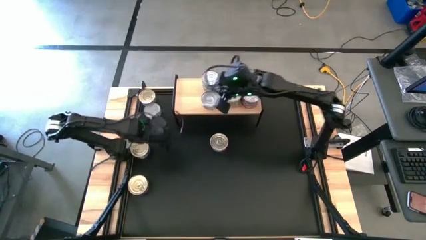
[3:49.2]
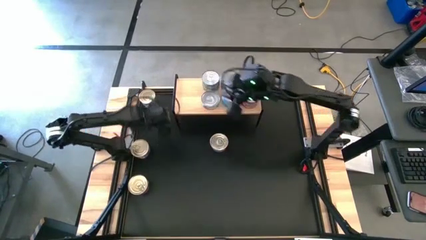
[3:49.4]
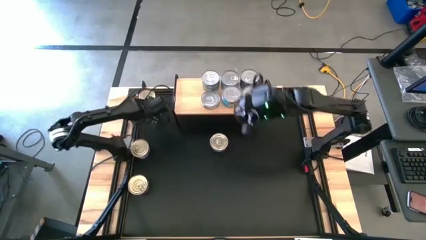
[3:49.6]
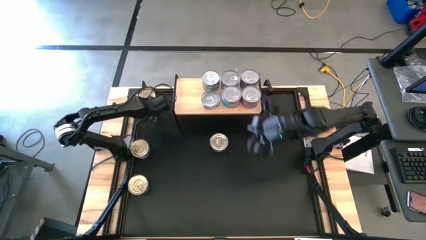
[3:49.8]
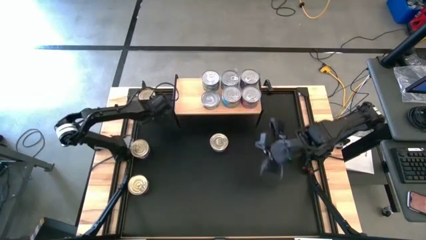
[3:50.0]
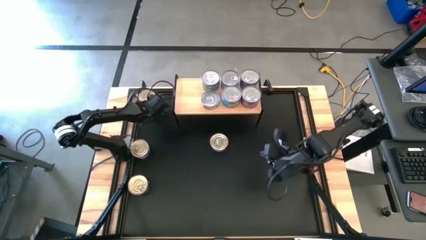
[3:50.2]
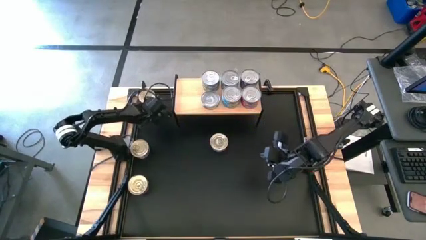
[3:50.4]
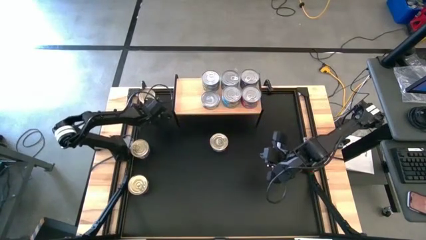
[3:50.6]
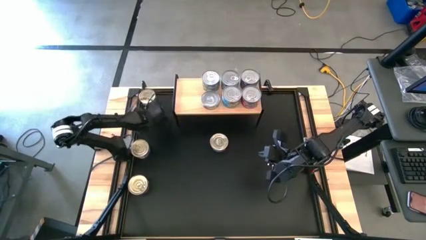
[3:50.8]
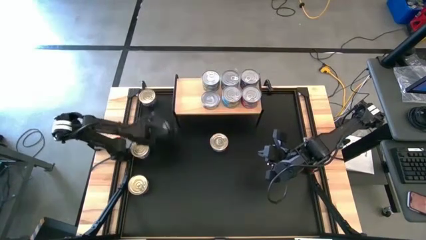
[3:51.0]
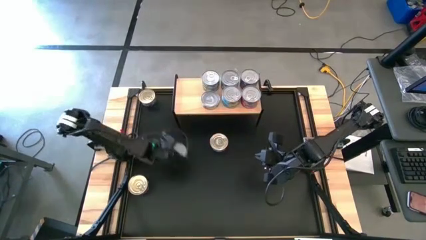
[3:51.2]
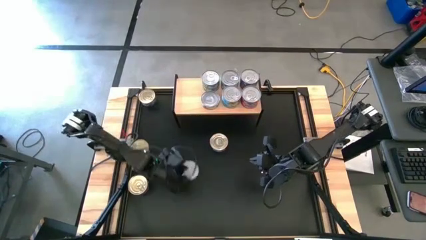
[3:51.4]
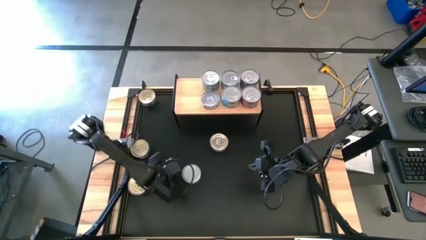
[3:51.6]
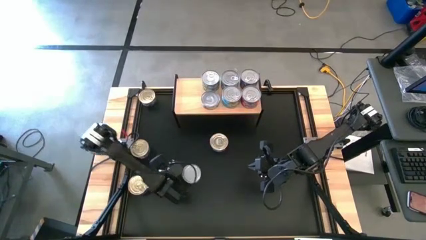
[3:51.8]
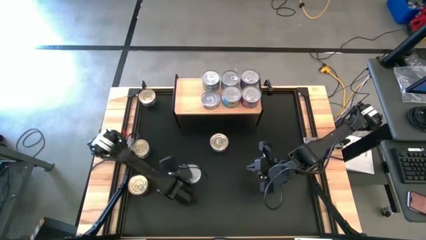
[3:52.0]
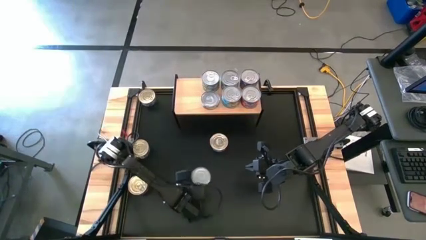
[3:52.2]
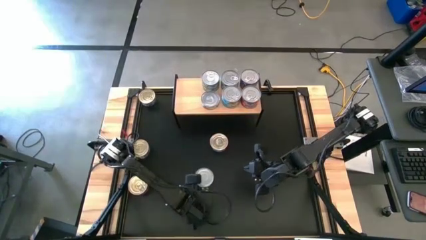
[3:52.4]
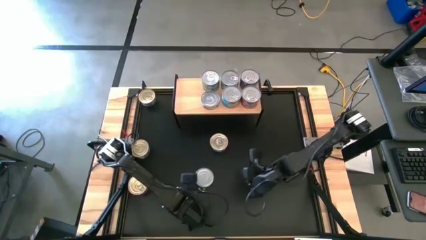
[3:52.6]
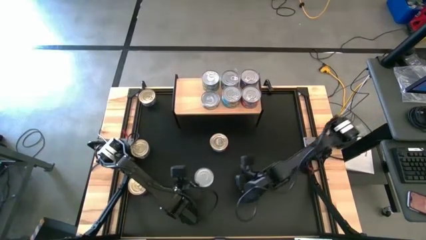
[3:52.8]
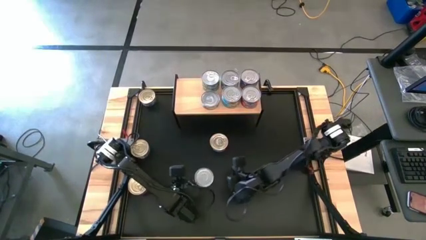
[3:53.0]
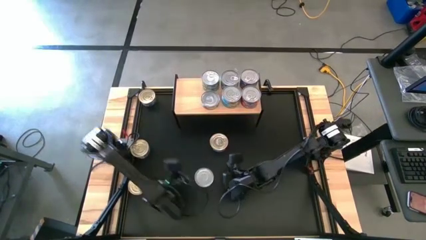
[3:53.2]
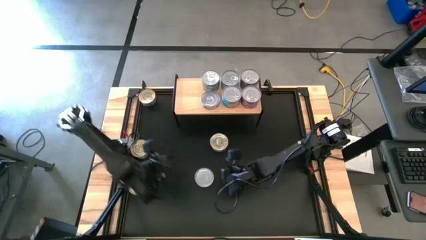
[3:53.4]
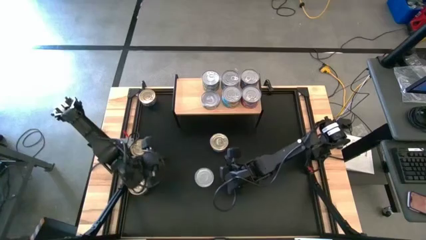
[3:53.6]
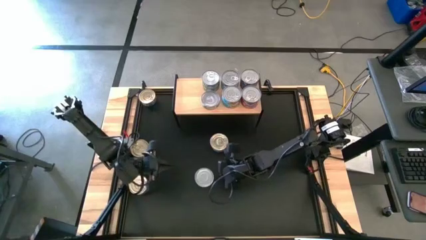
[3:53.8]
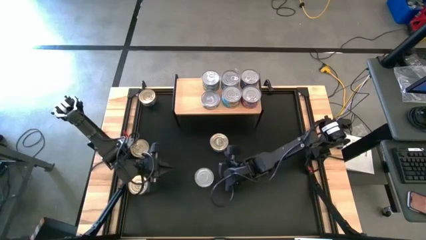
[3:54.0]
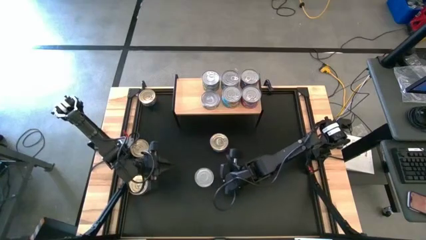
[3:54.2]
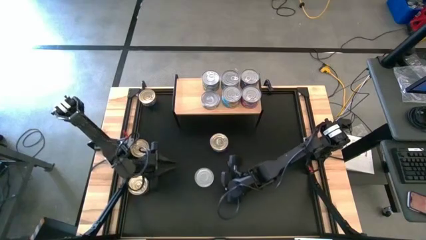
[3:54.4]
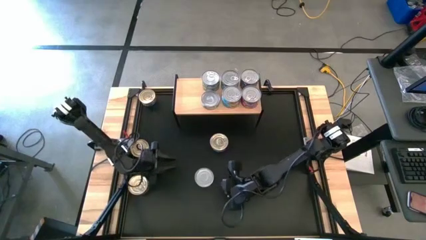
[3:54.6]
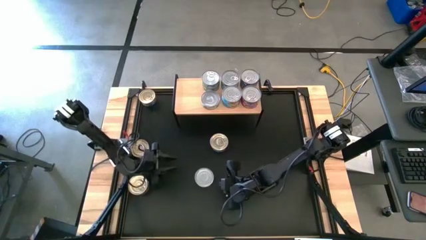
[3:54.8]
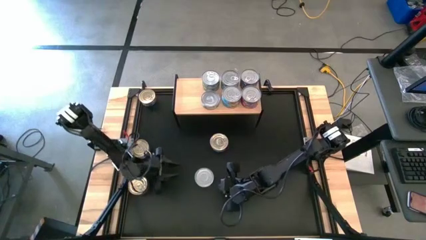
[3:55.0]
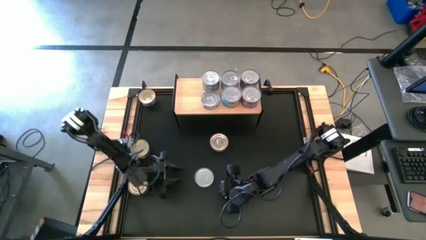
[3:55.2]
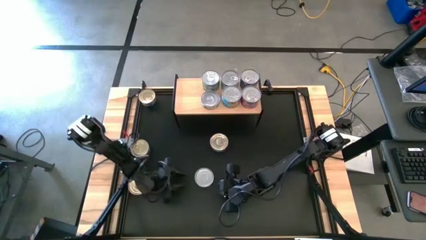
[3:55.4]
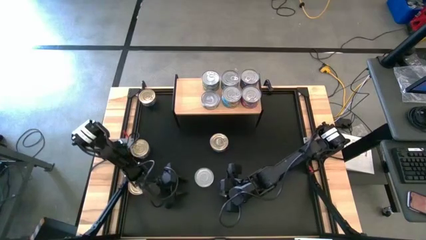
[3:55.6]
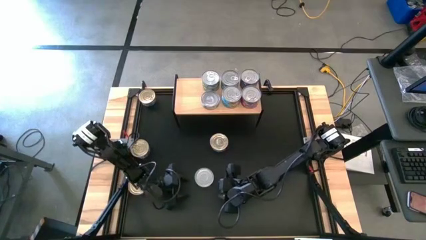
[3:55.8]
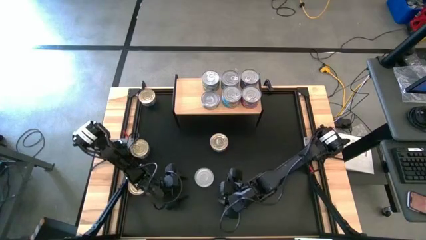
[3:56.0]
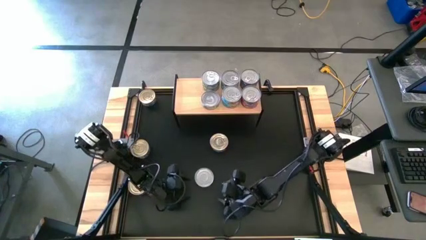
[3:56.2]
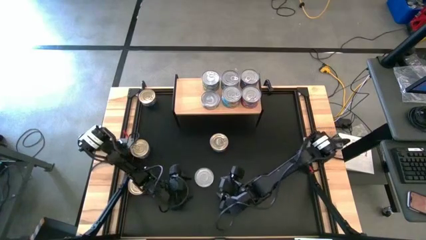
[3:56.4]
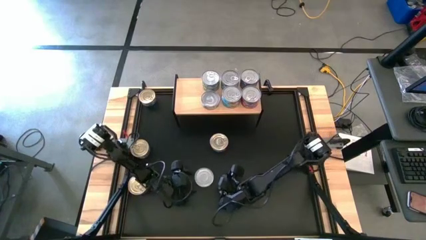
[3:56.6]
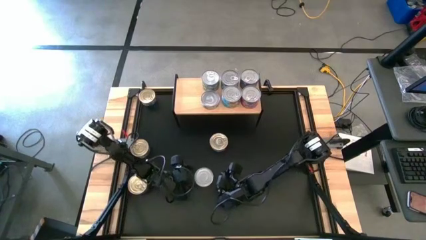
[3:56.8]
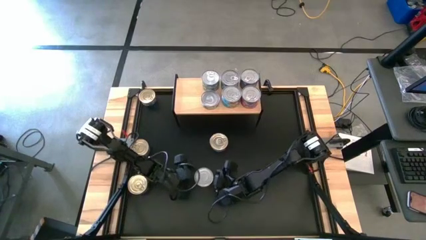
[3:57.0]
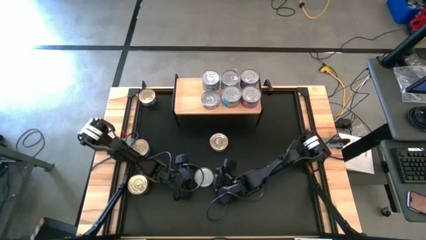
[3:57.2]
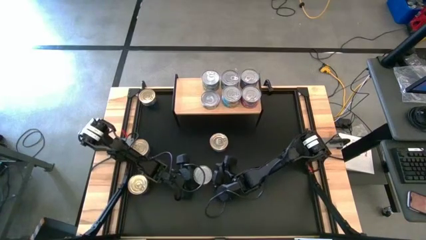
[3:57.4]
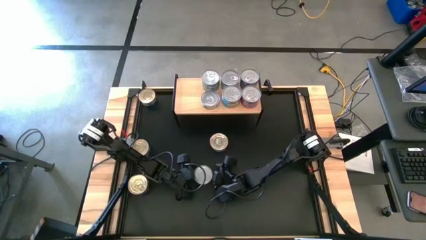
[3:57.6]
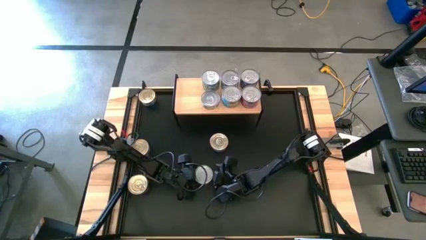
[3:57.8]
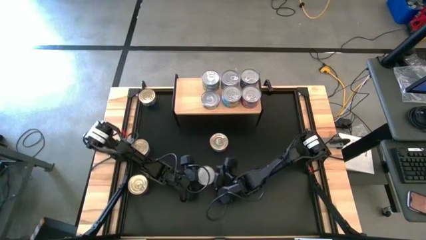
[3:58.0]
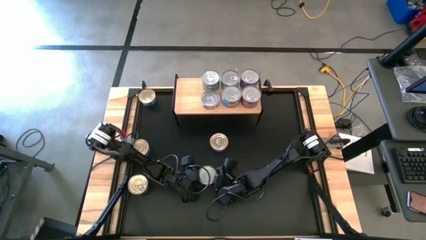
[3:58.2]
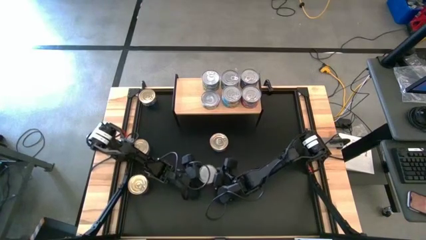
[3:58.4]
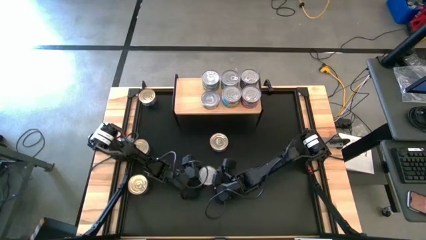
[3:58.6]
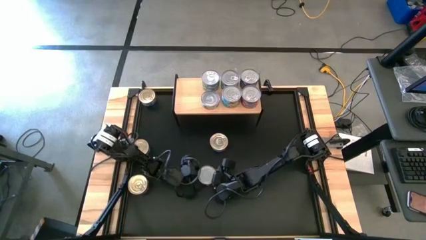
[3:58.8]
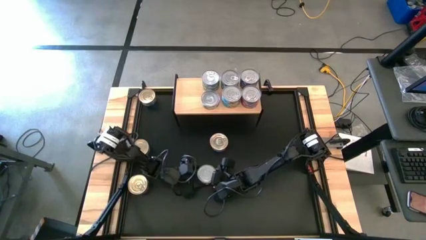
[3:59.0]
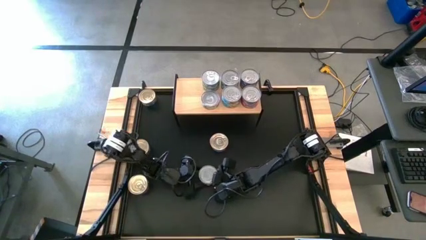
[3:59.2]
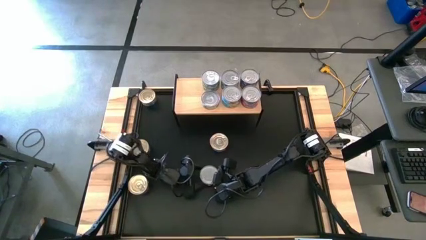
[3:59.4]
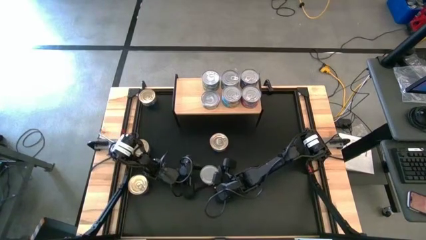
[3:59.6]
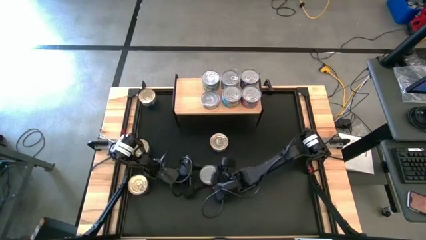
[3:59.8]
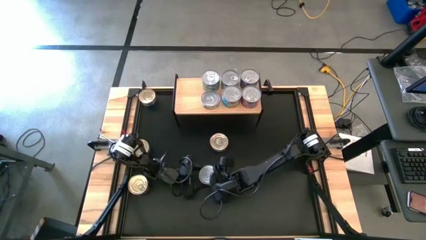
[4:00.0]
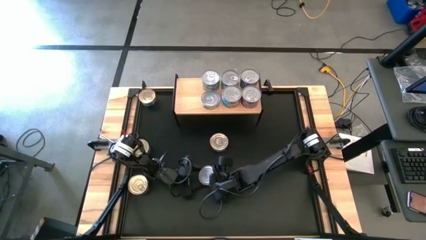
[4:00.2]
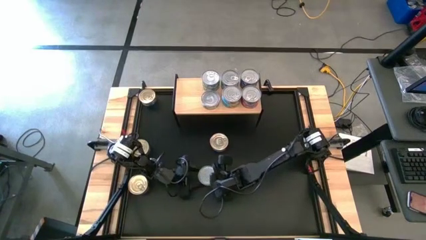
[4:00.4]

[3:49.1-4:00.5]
Task: Stack canned seafood by type on shelf
Stack the green white tuna can on top of the other green white tuna can on the shelf
